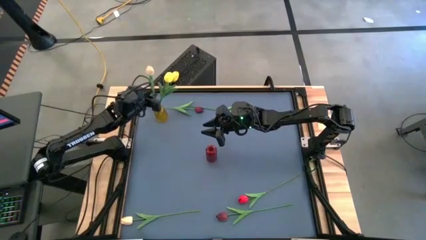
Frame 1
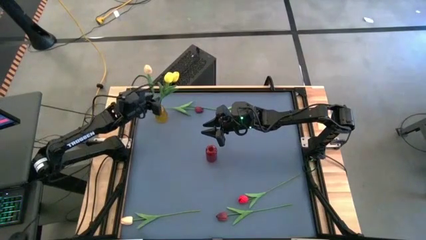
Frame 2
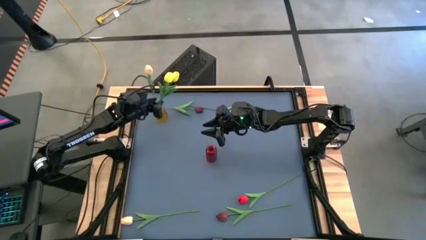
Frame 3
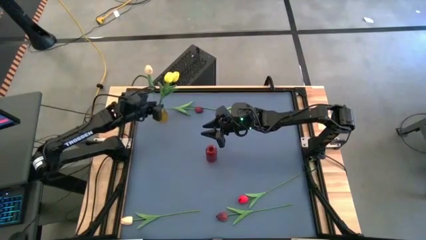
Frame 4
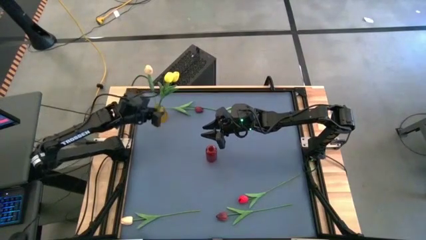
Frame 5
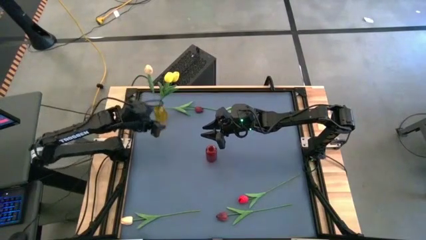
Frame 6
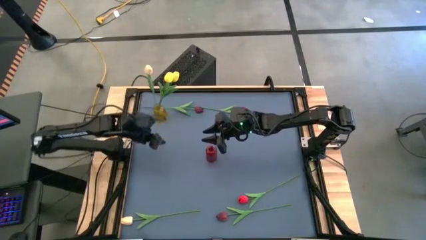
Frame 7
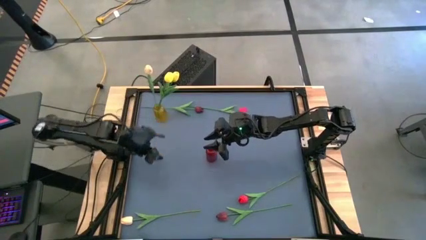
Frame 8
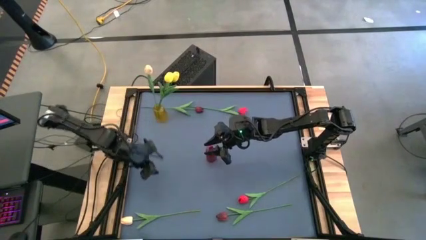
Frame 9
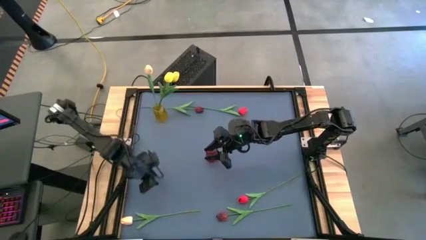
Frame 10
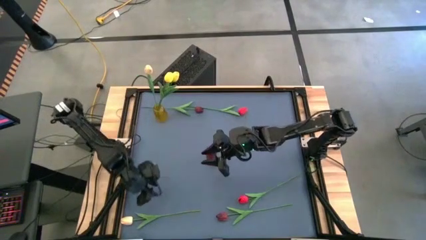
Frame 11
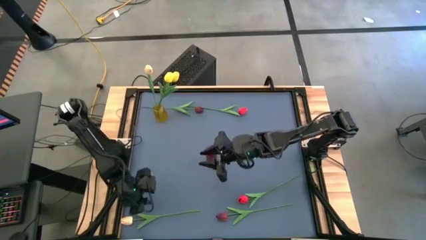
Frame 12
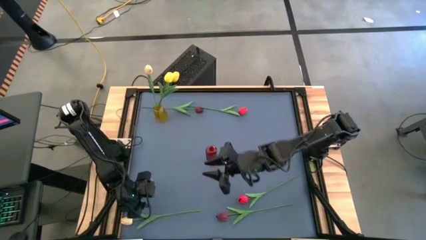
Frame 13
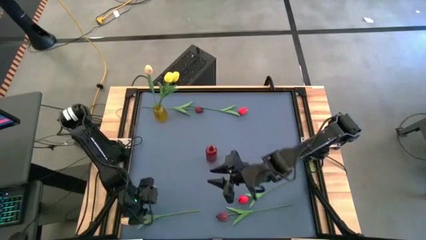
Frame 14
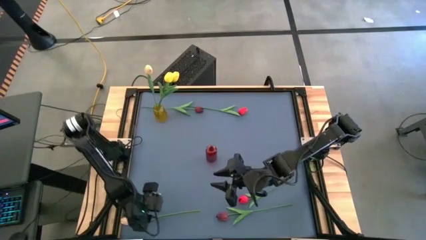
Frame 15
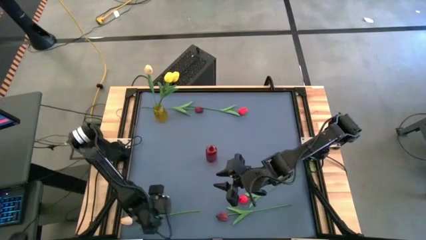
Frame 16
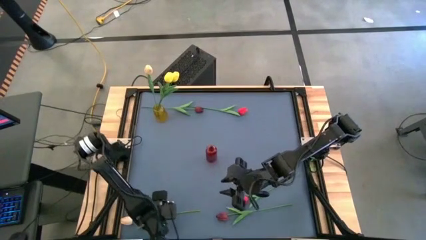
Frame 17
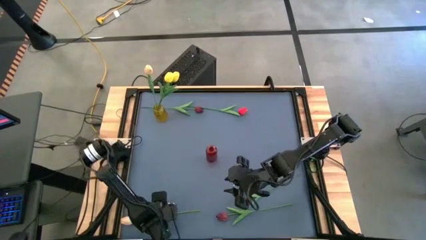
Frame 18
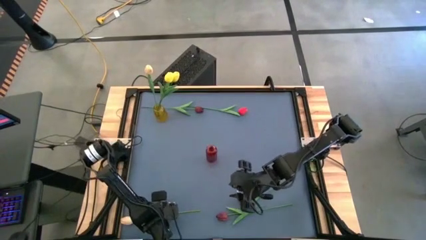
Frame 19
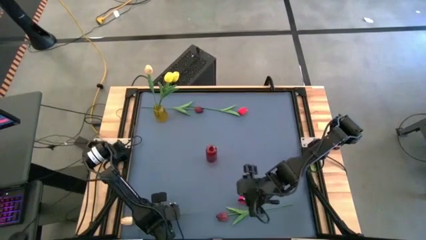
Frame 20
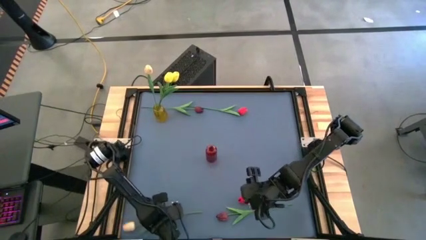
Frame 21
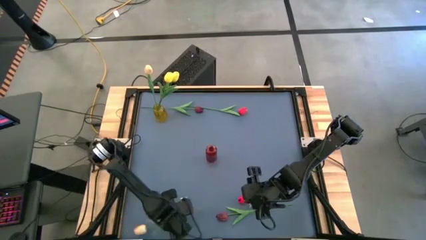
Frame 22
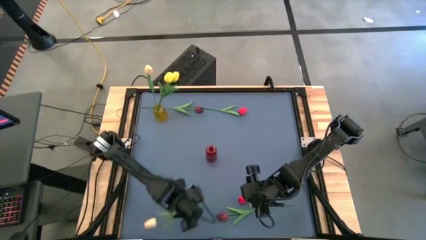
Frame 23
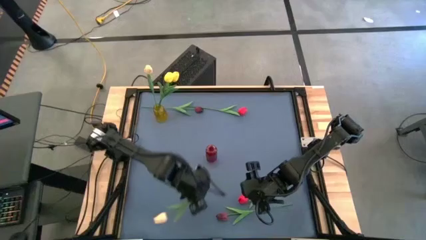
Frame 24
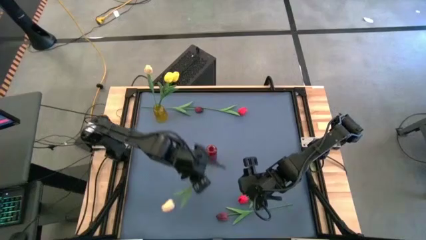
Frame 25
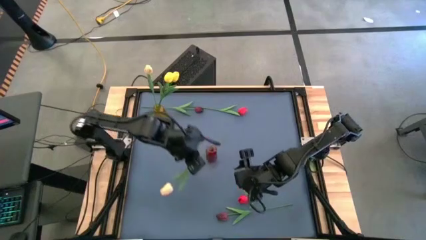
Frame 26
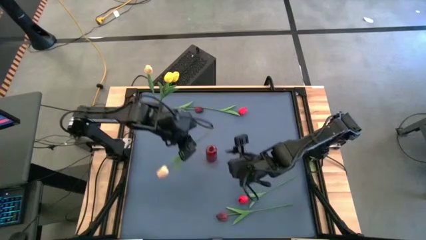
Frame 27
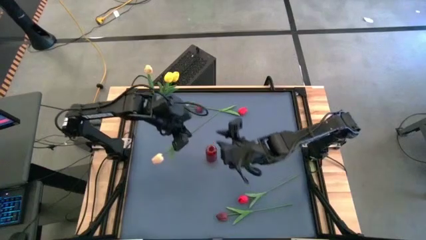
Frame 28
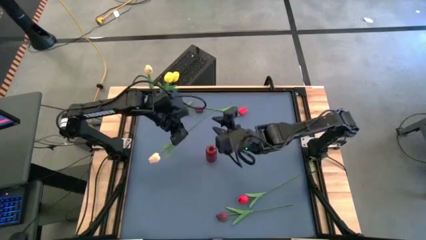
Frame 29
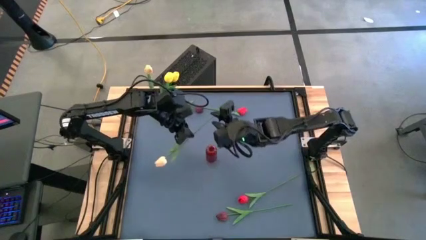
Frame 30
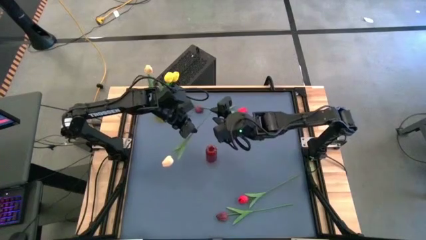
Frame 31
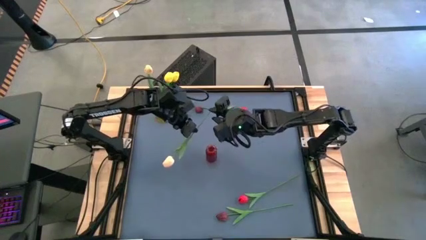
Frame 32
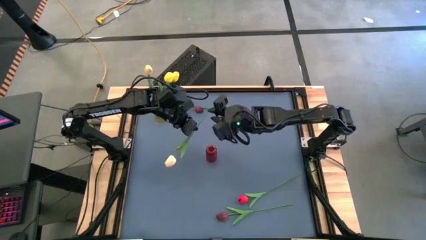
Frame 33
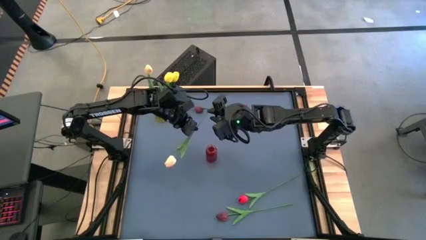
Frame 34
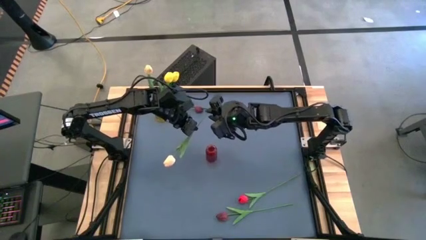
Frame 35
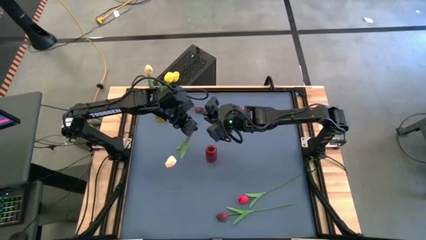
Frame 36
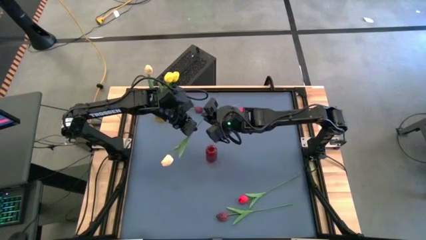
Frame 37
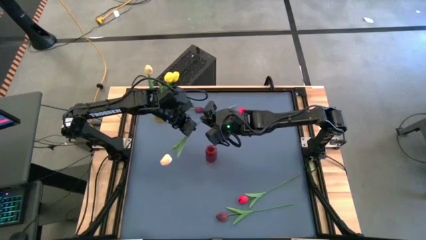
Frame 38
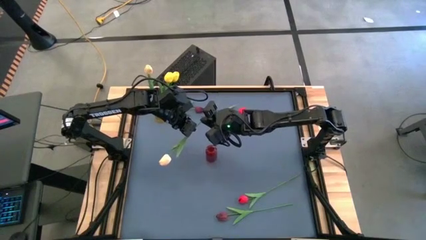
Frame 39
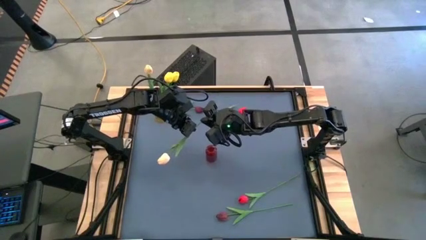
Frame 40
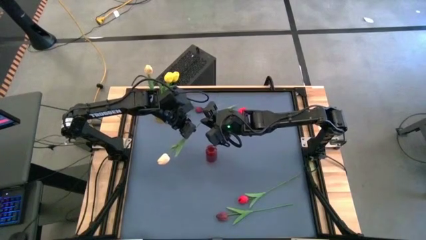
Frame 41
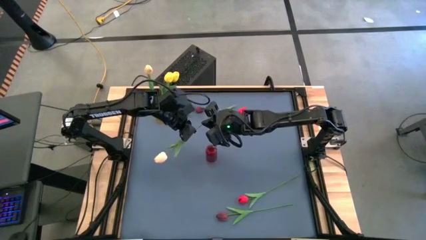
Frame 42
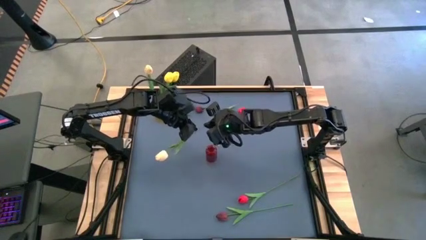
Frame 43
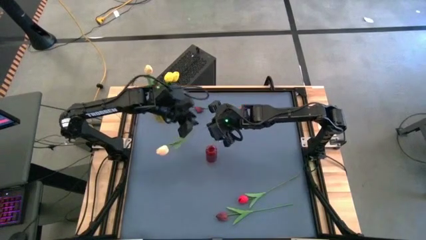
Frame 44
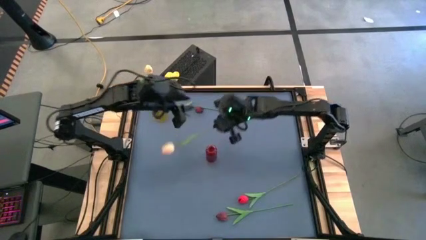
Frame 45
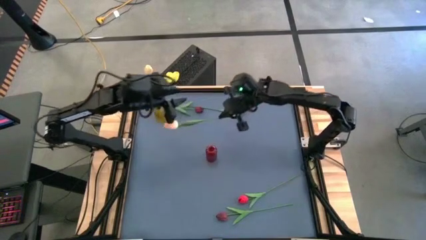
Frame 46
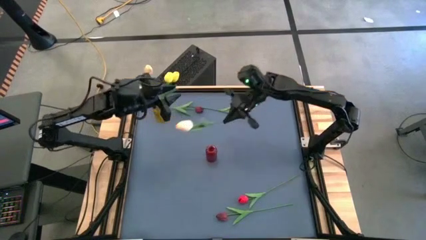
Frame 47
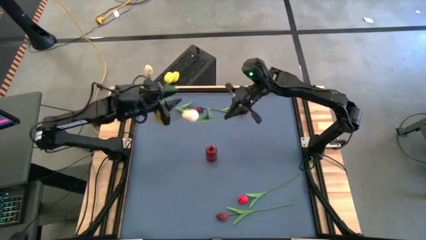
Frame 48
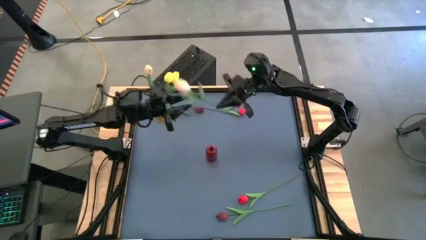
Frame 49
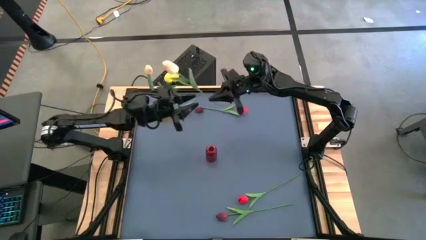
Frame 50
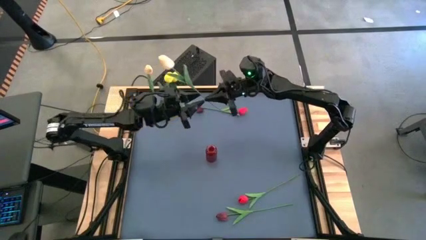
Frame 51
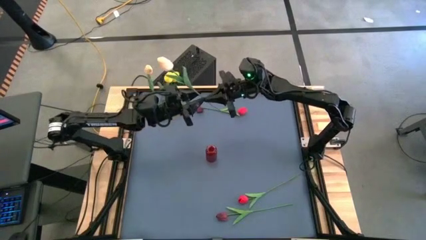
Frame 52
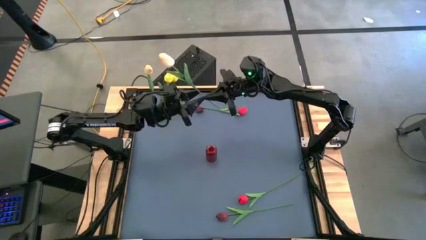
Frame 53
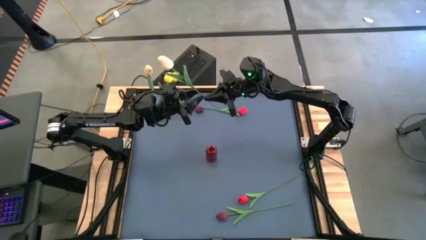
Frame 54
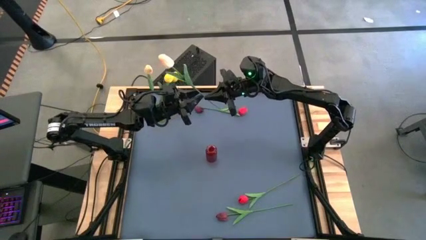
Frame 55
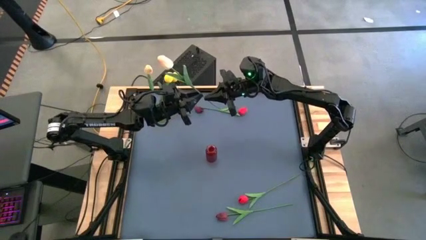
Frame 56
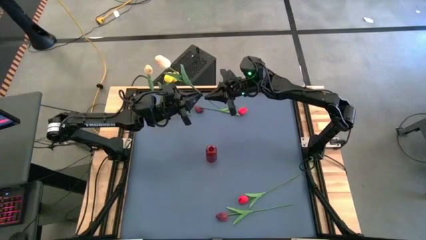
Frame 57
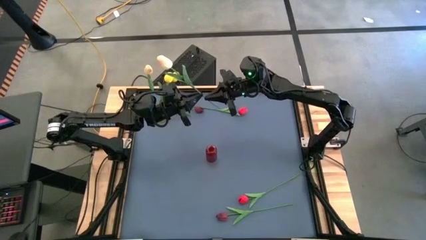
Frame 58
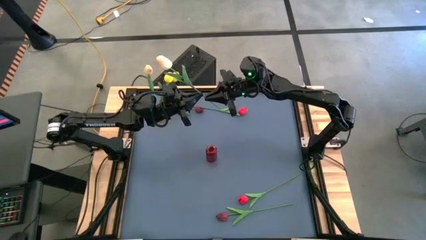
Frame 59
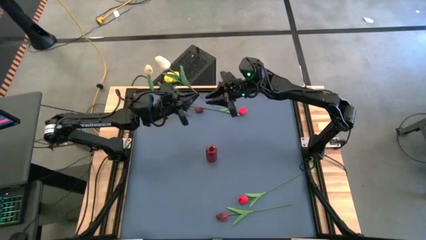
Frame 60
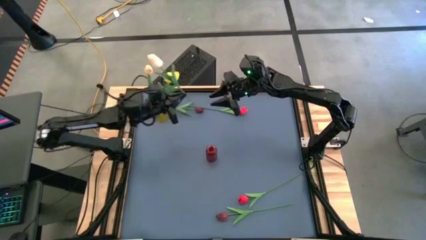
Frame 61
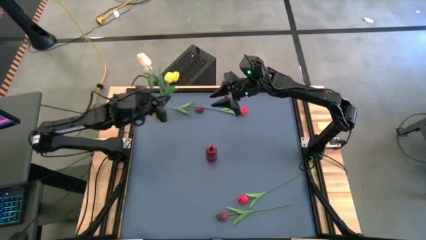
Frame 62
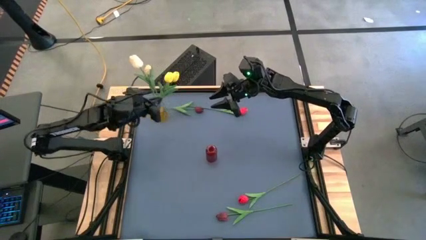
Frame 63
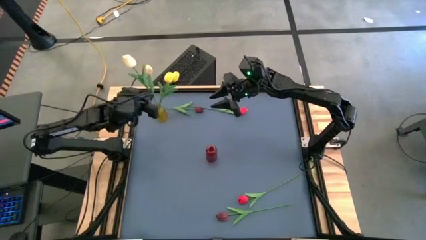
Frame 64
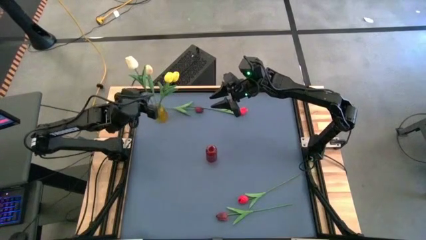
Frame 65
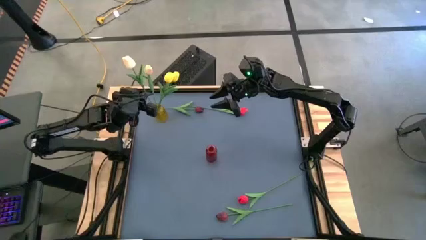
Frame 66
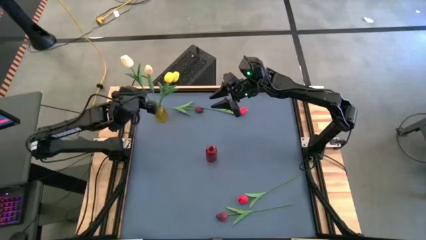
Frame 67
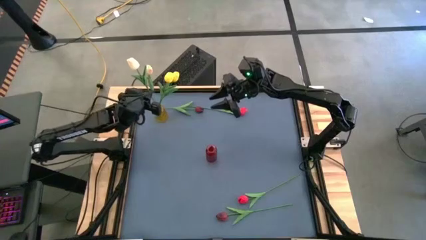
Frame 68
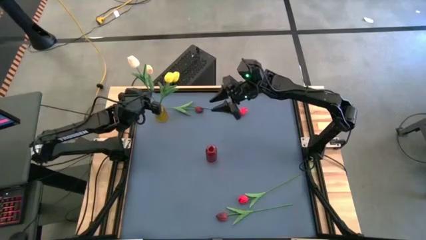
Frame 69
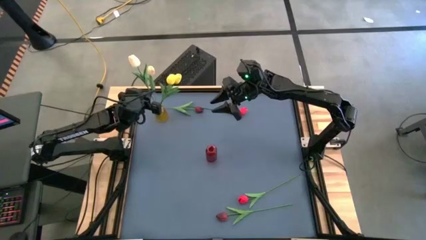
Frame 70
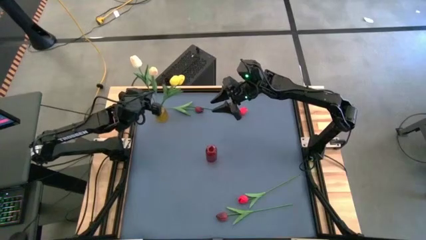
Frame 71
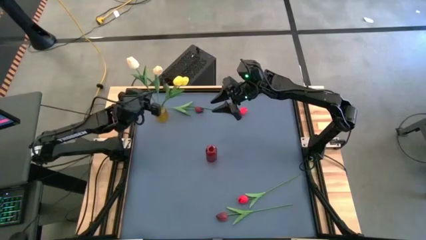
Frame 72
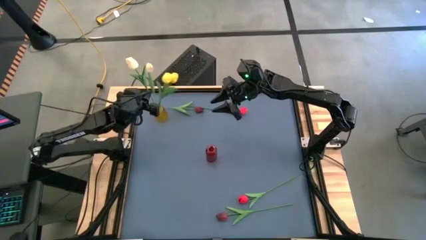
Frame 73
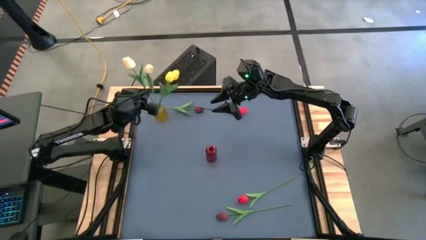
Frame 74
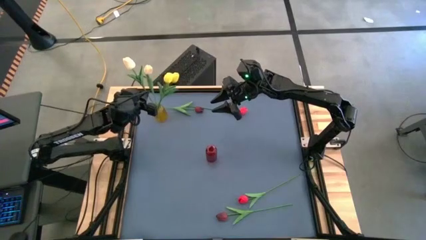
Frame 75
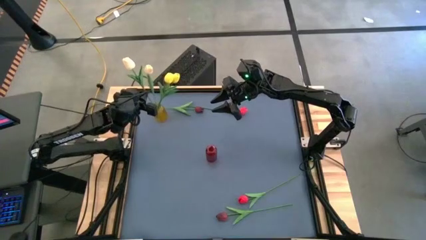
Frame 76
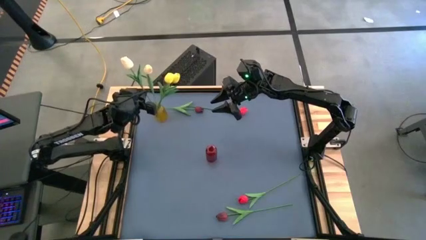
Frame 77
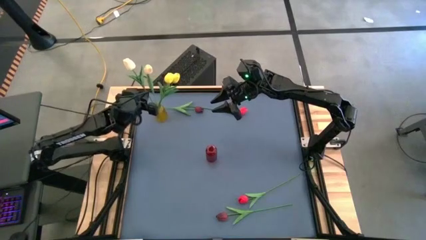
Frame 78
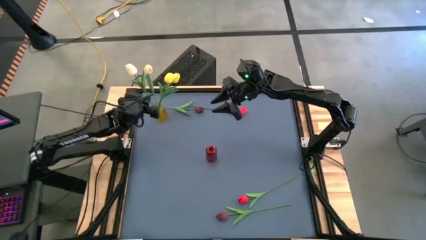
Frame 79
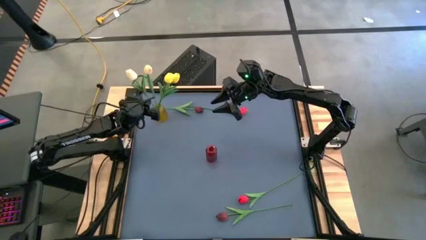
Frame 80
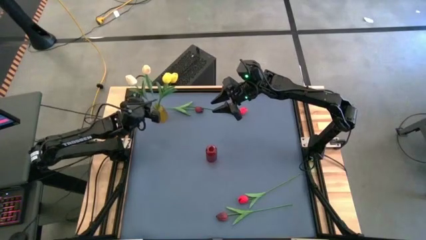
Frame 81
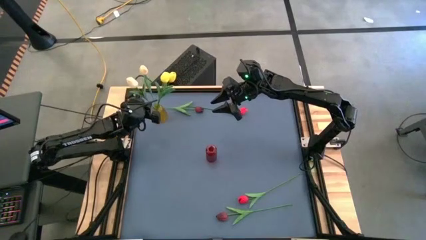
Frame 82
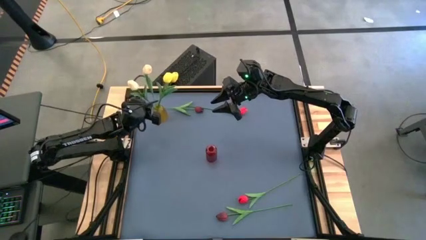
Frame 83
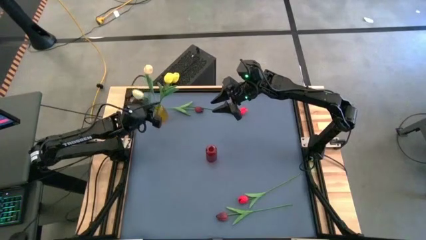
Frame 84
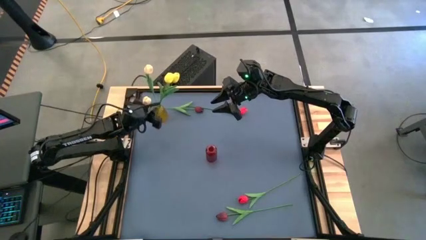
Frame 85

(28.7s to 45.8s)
Task: Sort flowers into vase by color
Put the white flower into the yellow vase

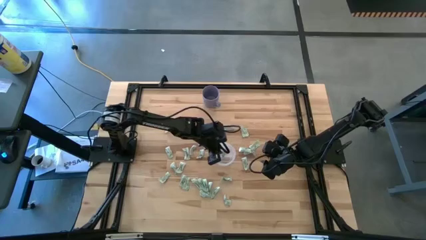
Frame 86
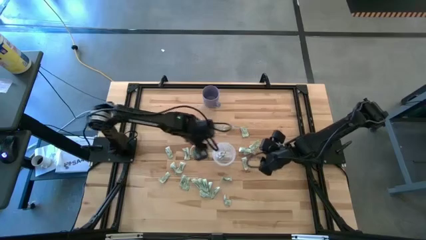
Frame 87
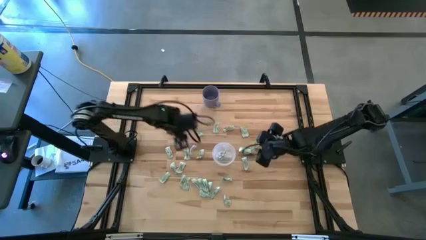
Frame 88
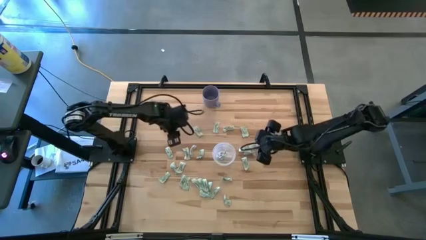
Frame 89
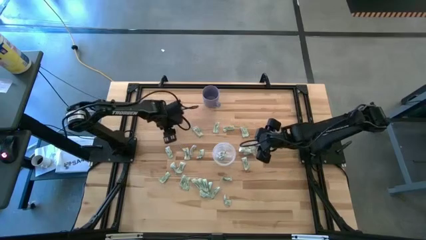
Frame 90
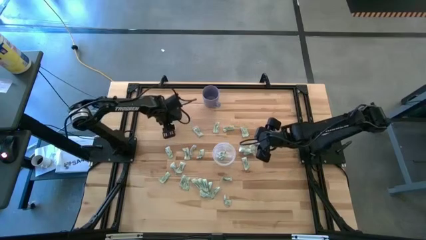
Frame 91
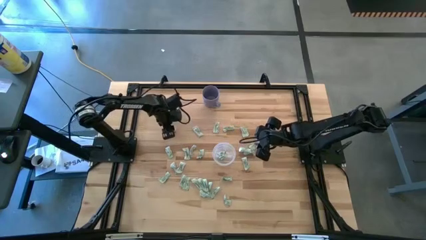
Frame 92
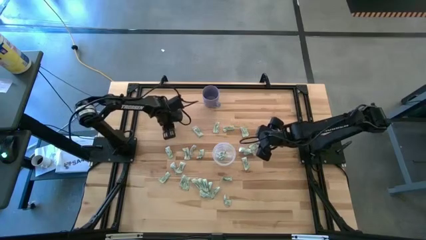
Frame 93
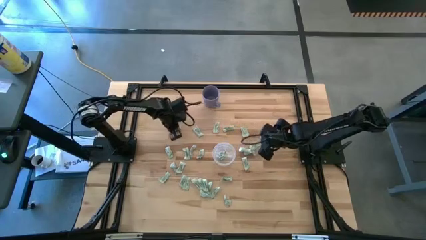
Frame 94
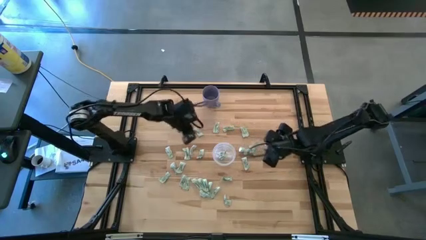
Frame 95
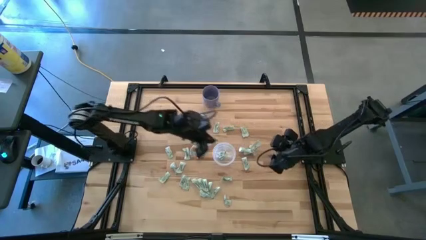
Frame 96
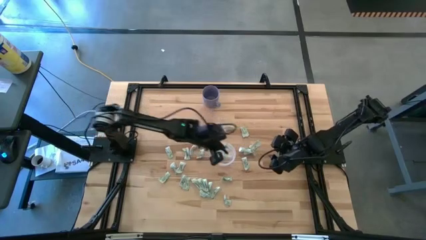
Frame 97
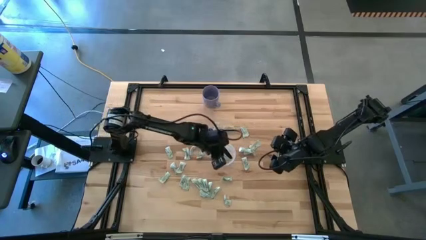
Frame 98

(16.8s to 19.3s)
Task: Pick and place Stevia / Truvia into bins
Put the stevia packet into the transparent container
